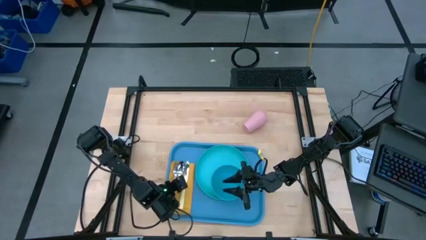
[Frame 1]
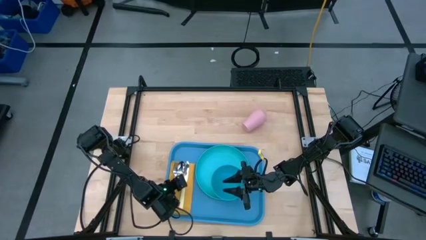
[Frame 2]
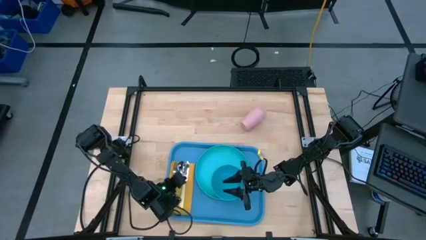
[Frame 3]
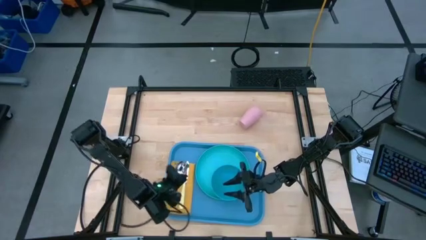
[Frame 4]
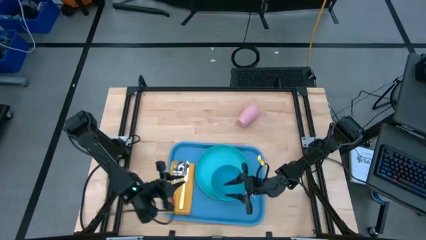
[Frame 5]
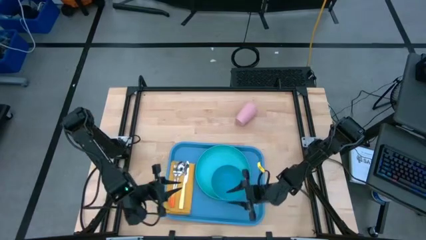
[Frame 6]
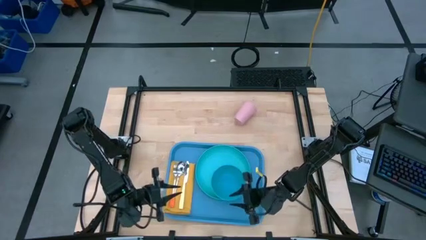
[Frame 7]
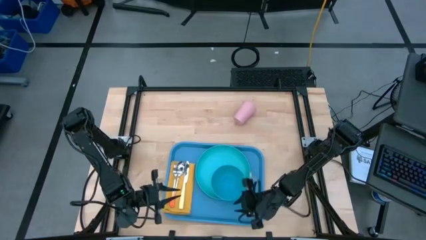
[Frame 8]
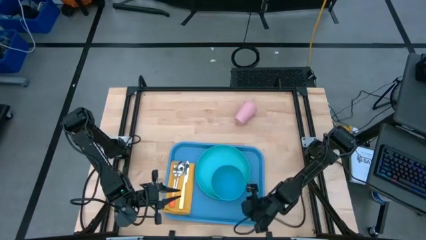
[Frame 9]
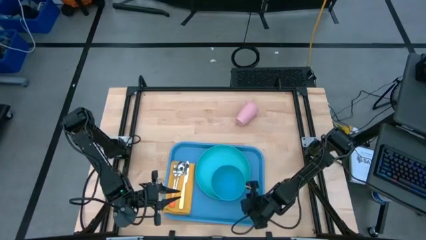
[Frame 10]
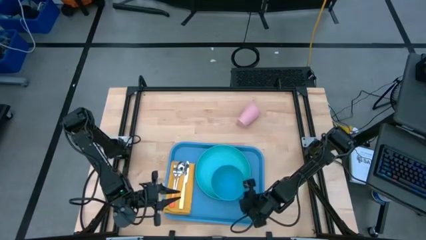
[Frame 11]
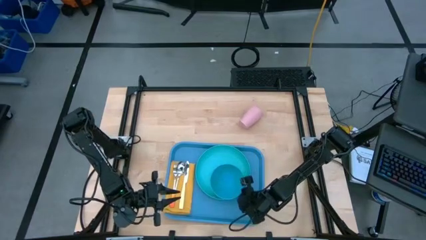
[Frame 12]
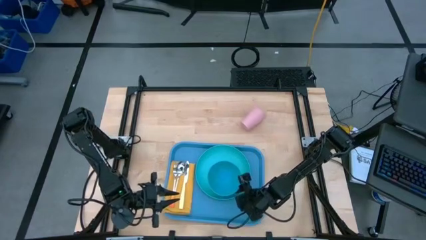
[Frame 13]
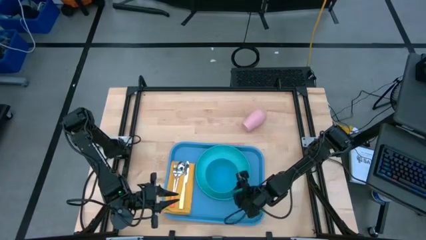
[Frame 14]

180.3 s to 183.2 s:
Task: Set up tray
Adjust the blue bowl on top of the light blue plate

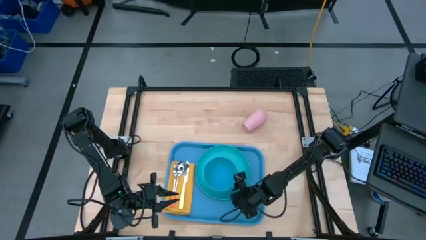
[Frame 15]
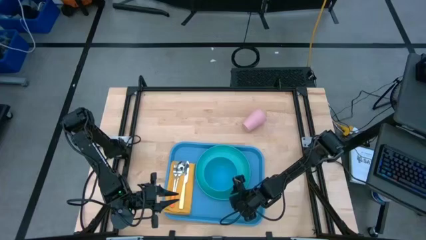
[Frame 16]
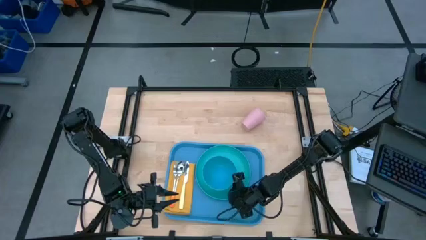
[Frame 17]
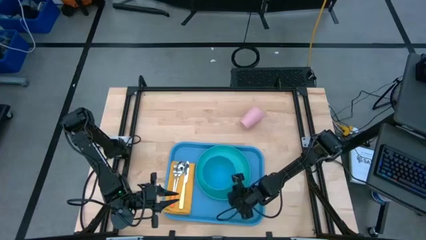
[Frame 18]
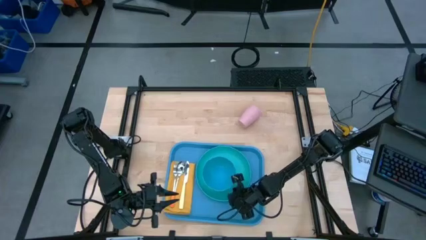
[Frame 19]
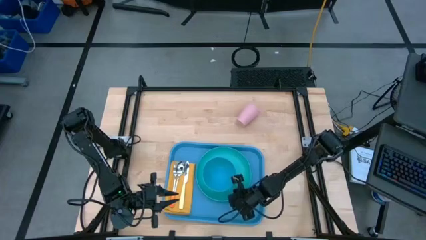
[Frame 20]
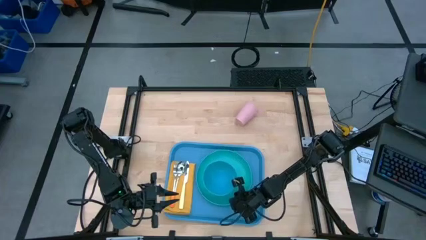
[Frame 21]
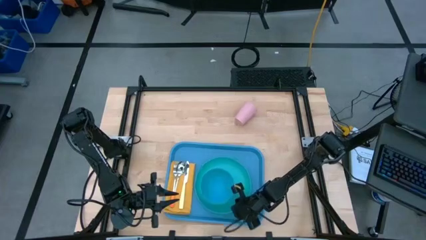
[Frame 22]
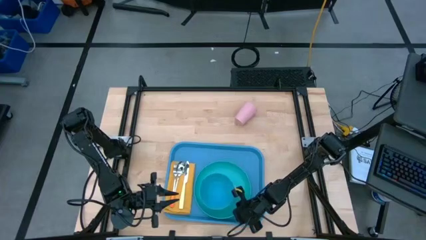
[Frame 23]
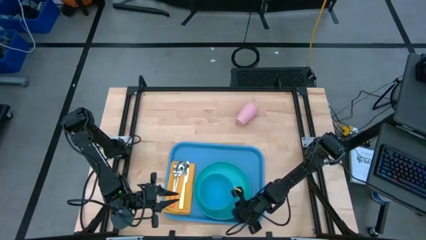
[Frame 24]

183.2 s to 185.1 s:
Adjust the light blue plate on the blue tray

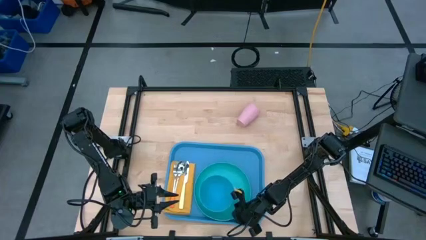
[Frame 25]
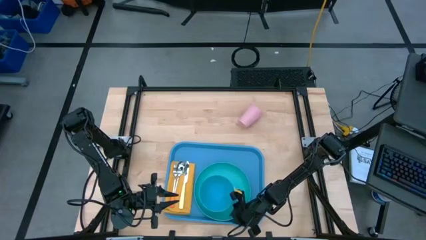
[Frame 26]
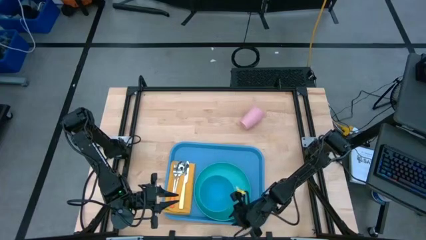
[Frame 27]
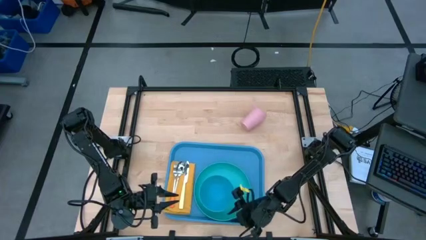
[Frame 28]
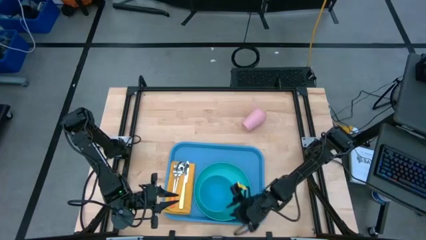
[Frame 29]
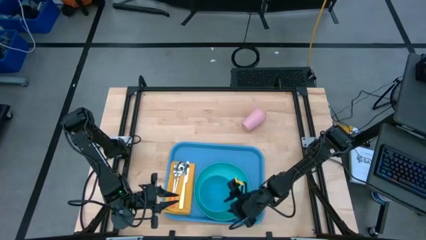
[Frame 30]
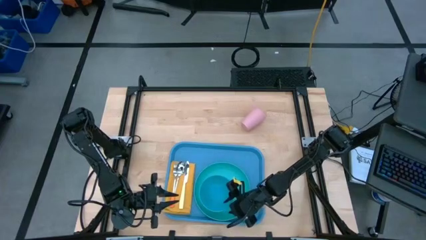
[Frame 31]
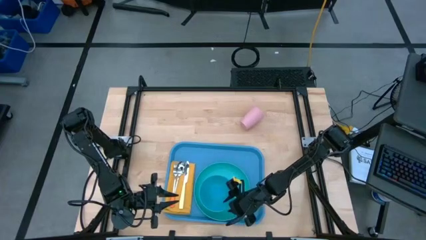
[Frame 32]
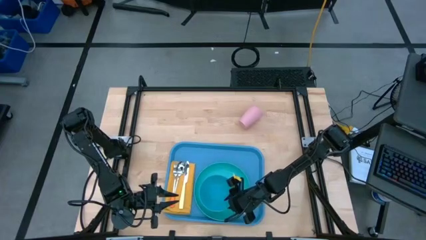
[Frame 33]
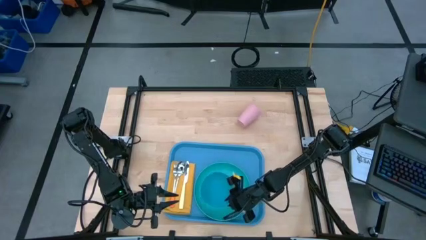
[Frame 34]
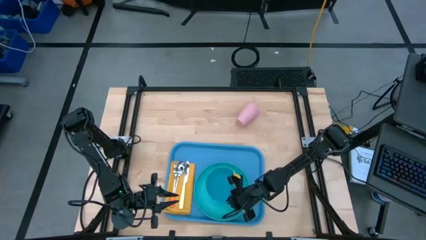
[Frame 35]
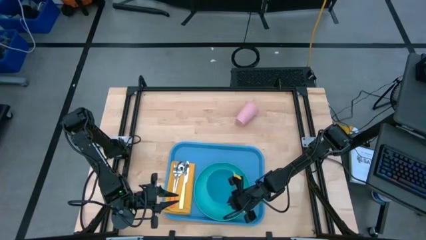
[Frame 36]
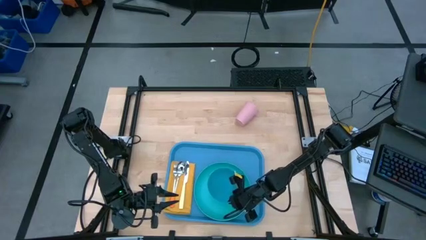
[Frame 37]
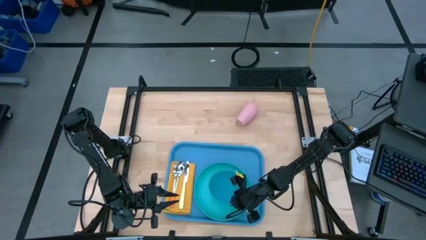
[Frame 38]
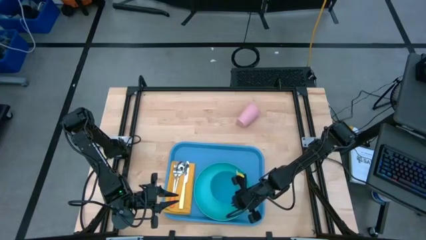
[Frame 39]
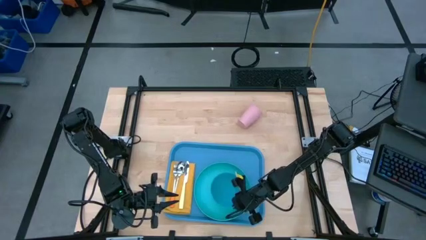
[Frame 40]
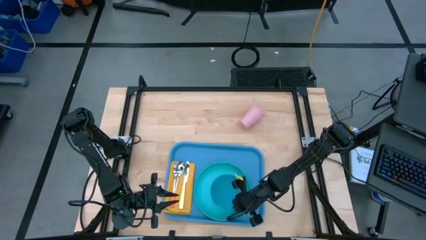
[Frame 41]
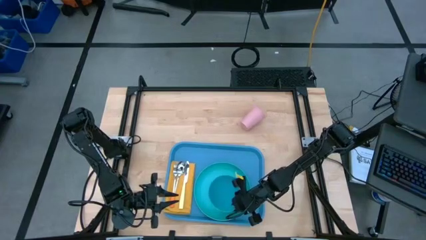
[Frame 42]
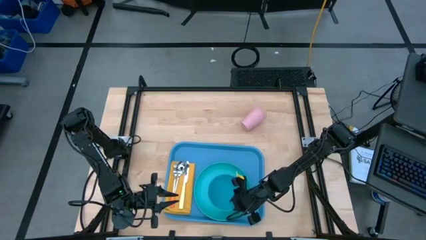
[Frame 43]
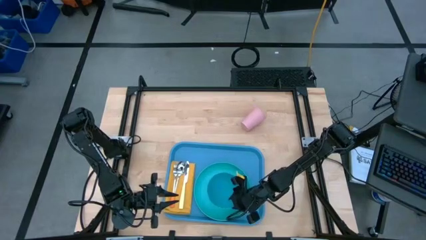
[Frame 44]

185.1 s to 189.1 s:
Adjust the blue bowl on top of the light blue plate

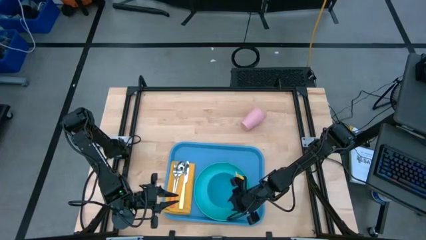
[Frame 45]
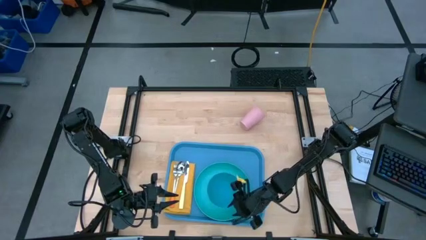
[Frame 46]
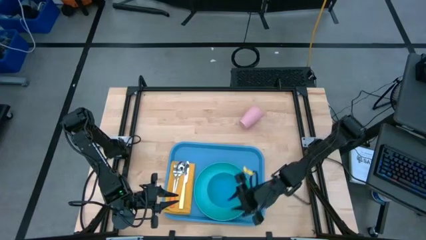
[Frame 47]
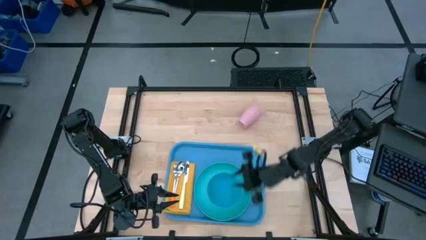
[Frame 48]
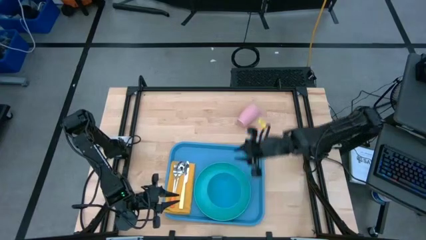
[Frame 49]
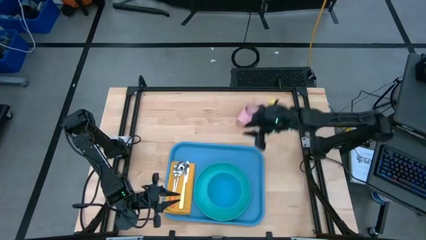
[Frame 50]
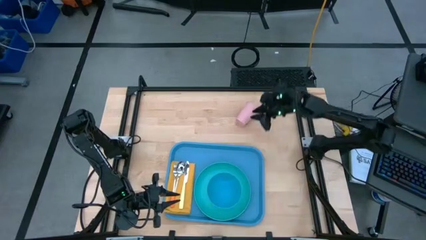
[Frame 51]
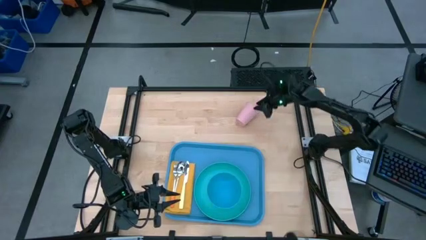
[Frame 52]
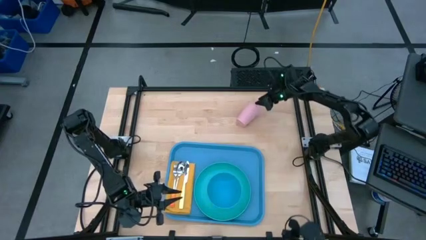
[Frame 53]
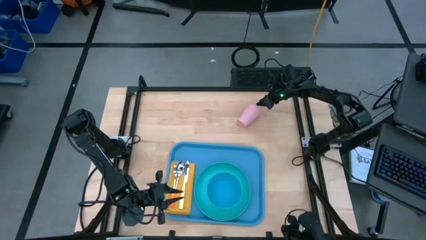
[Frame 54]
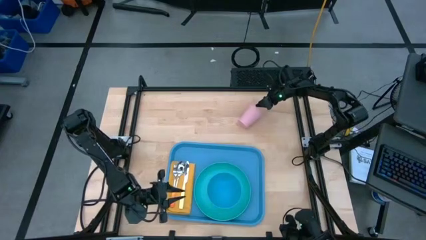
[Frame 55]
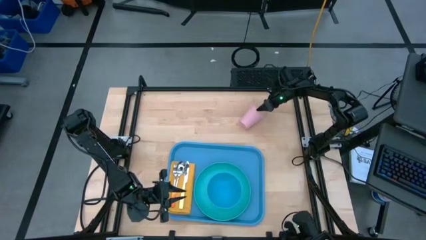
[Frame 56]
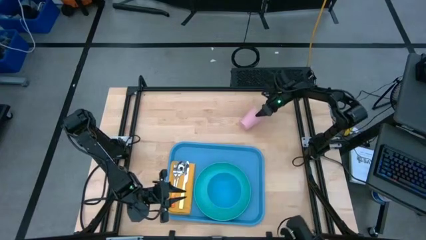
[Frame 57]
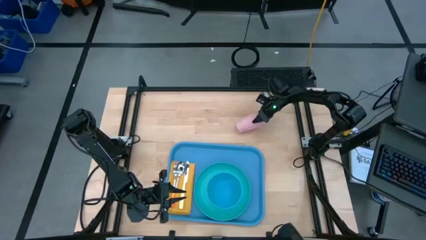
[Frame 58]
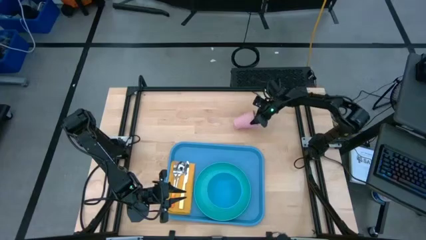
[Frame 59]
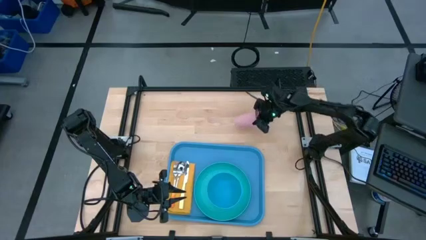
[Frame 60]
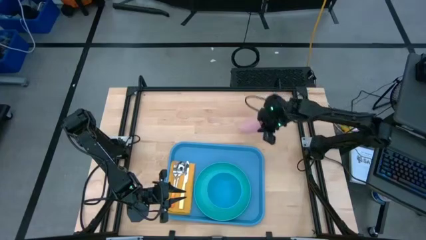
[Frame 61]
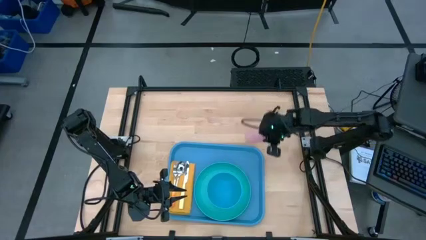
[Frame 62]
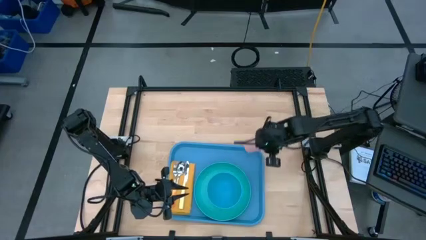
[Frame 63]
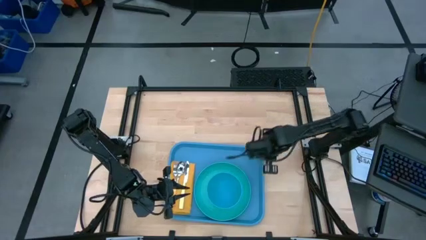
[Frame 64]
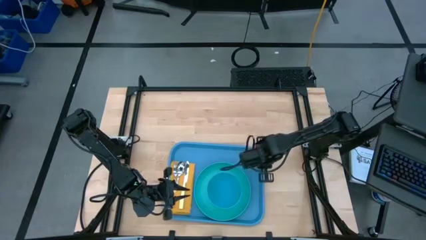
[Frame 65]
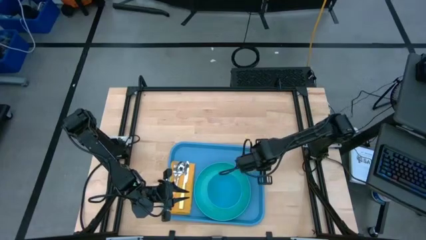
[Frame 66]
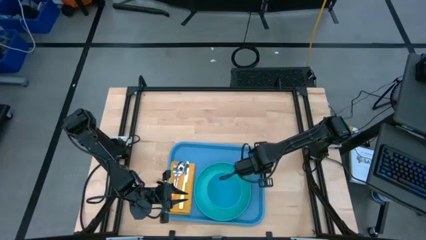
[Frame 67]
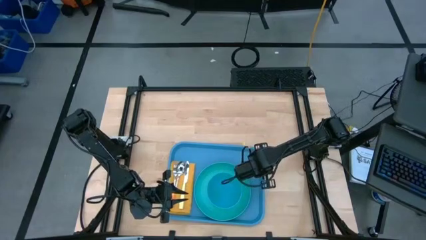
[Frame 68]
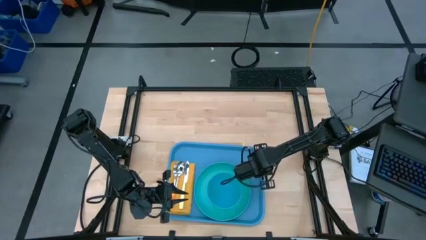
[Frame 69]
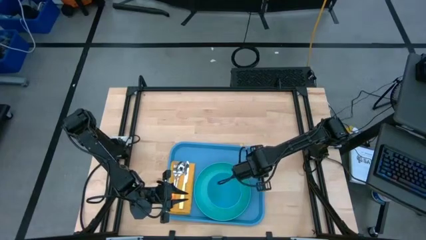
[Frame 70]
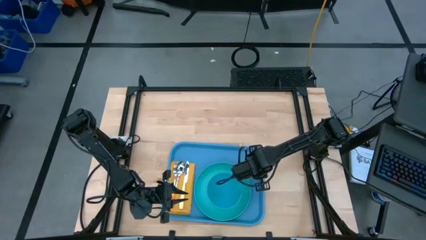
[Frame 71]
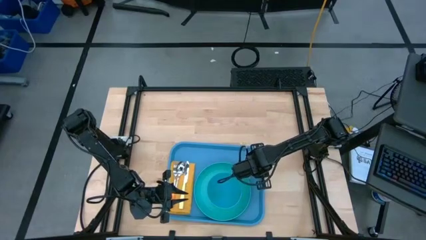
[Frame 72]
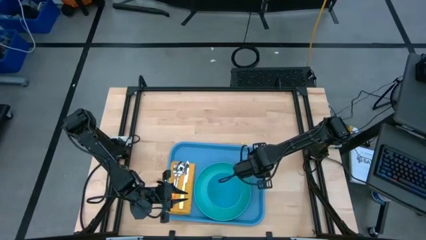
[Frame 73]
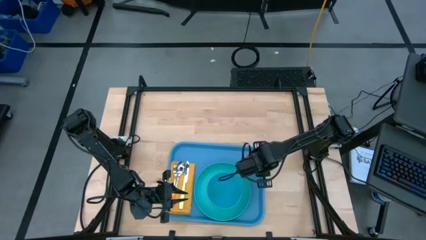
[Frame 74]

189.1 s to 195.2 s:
Put the pink cup on the blue tray to the top right of the green plate
